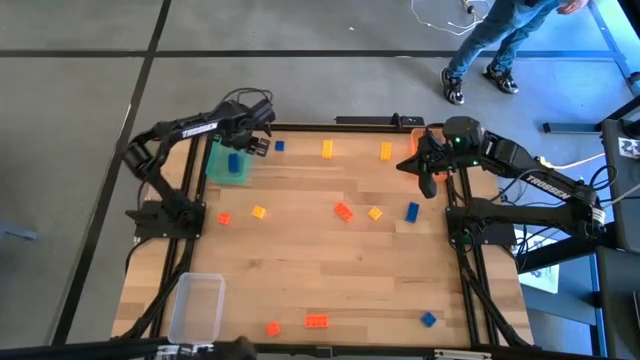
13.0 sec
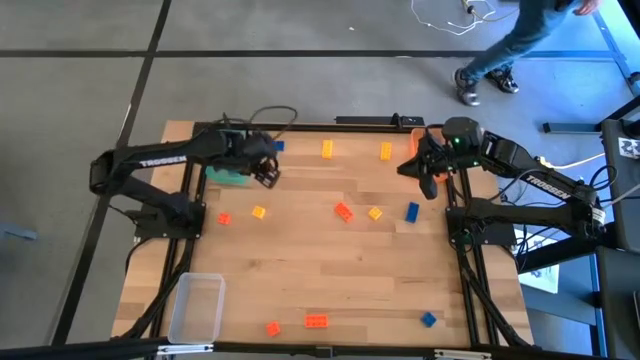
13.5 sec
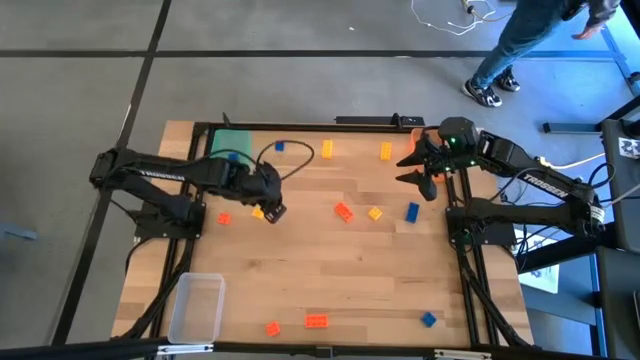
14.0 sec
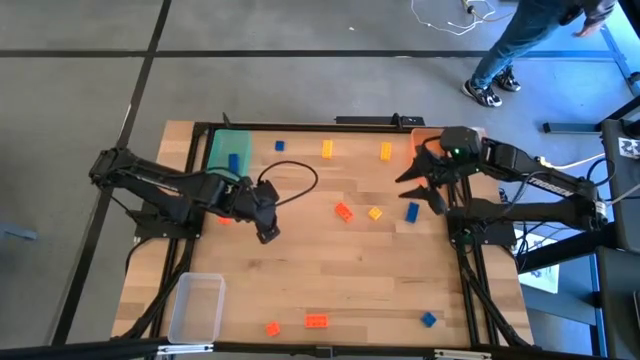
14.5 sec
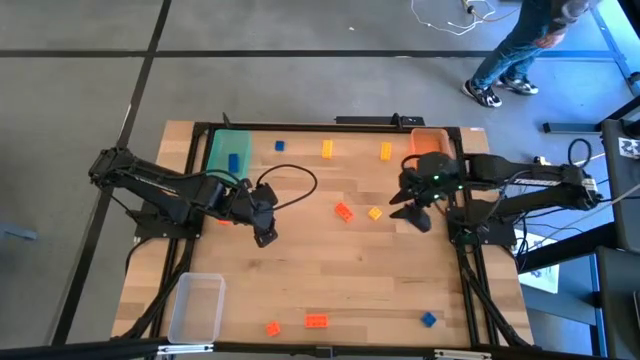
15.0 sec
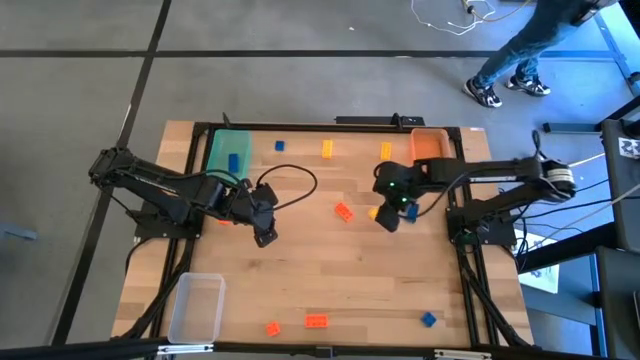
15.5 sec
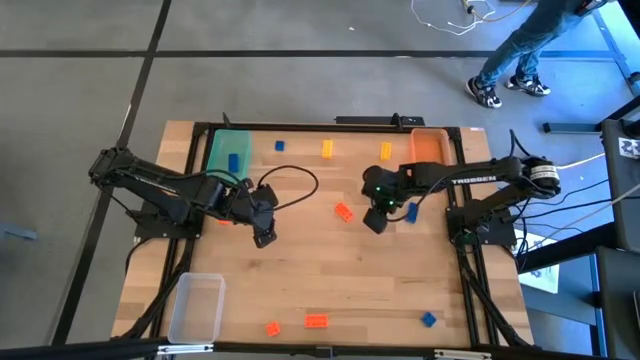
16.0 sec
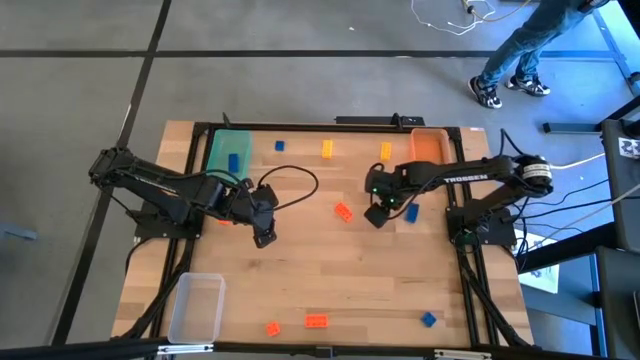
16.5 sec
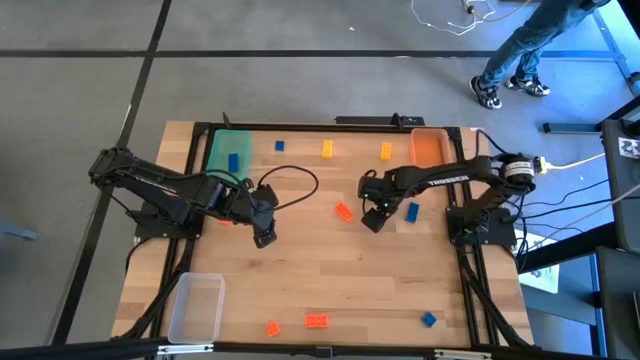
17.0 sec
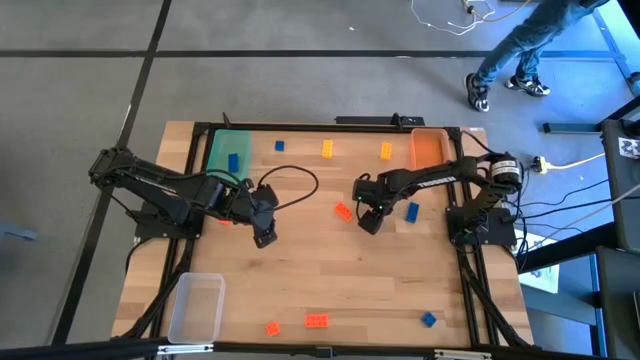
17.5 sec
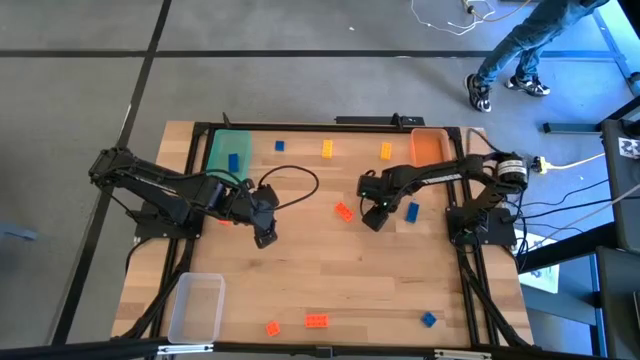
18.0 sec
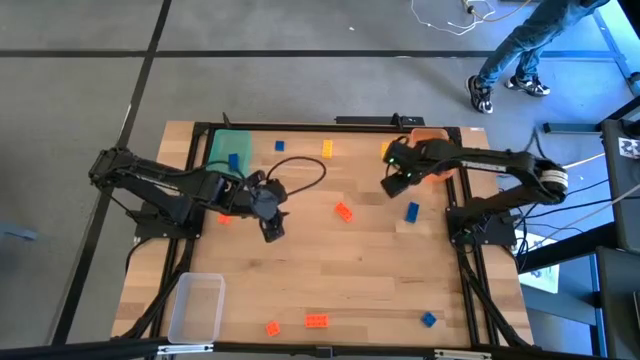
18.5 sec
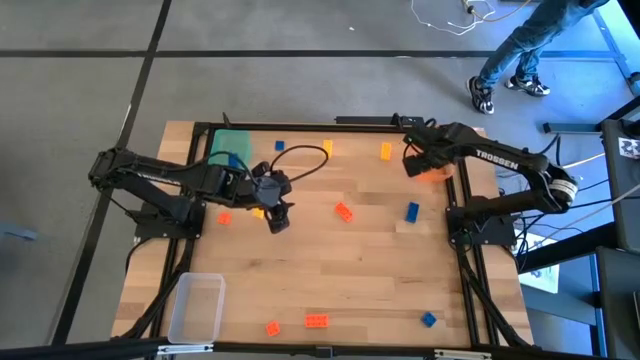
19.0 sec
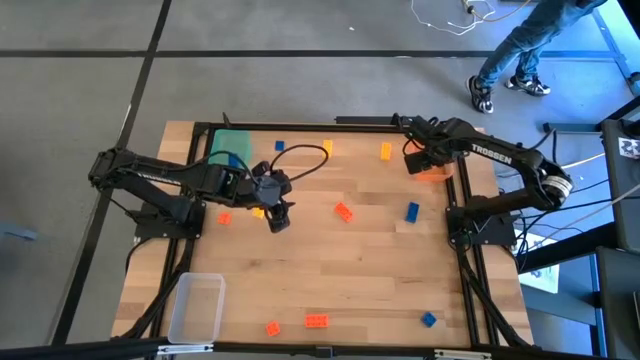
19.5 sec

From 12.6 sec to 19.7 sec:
Task: Sort & place blocks by color
Put the yellow game piece into the orange bin

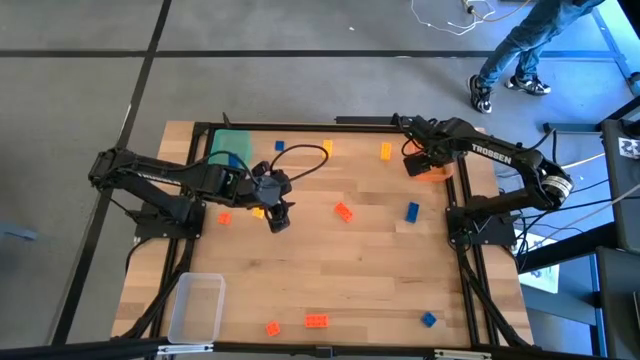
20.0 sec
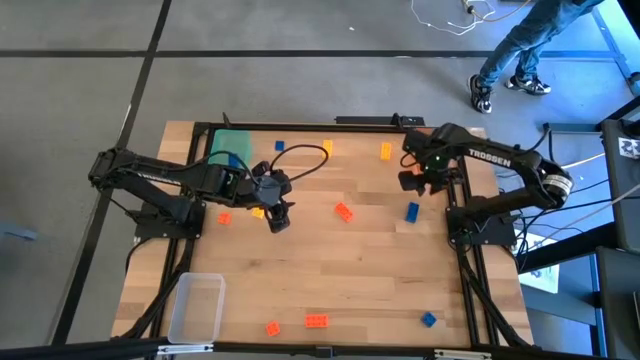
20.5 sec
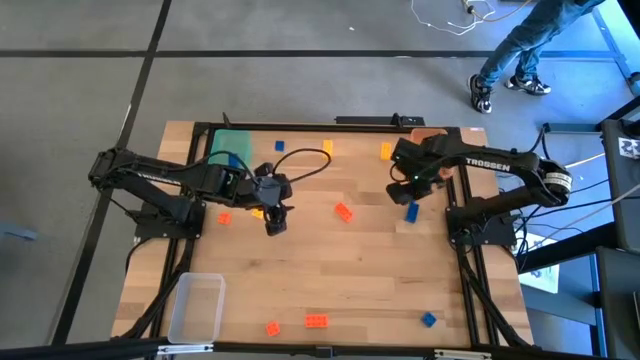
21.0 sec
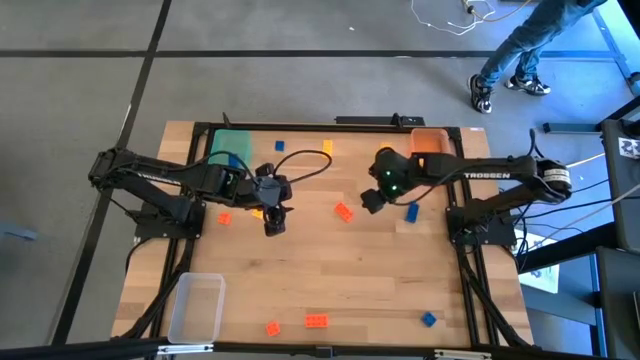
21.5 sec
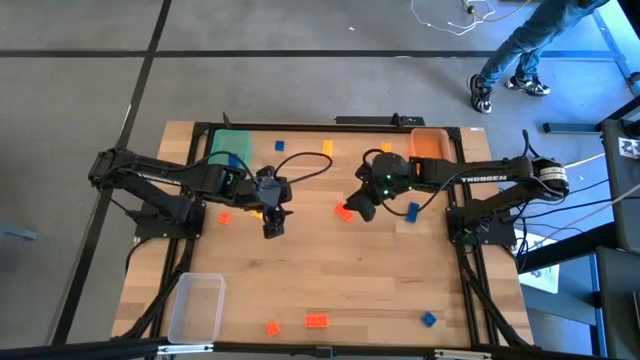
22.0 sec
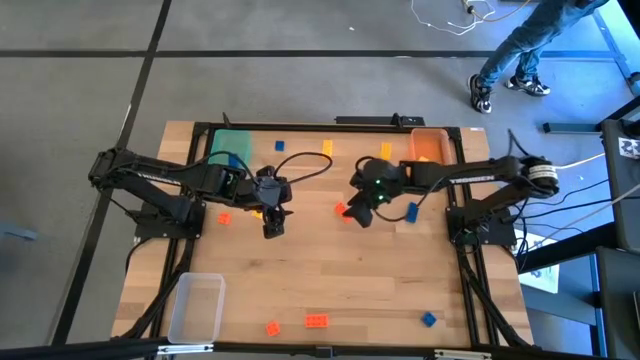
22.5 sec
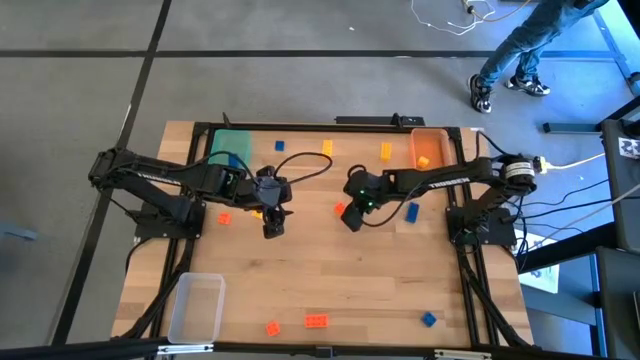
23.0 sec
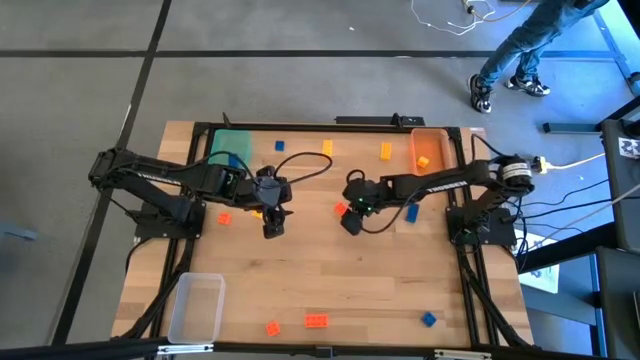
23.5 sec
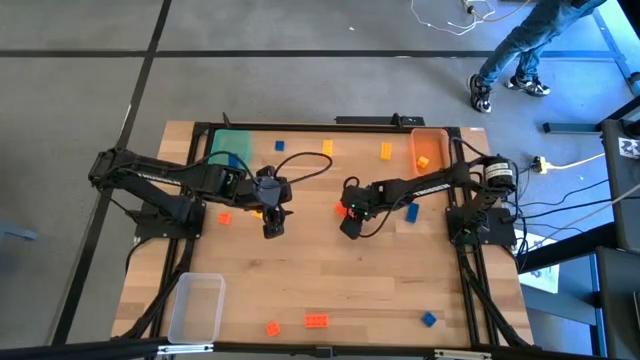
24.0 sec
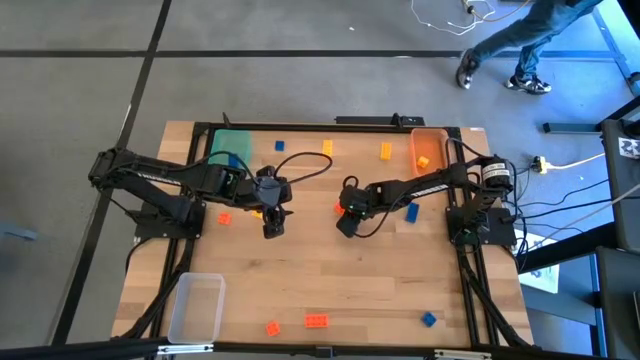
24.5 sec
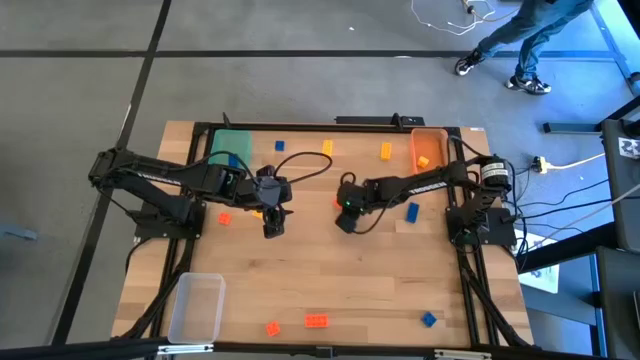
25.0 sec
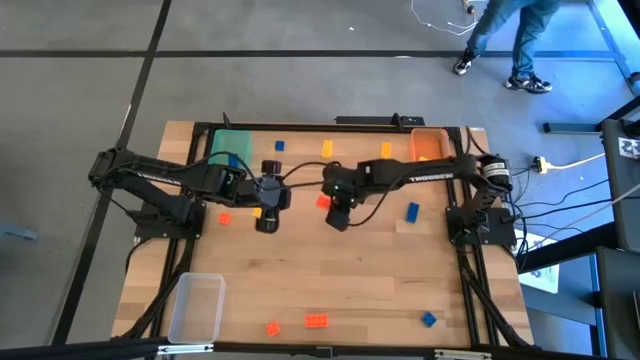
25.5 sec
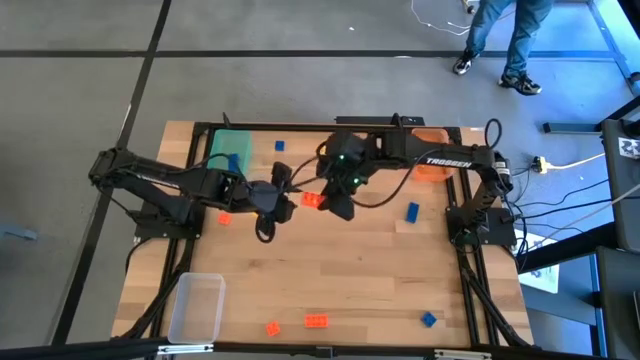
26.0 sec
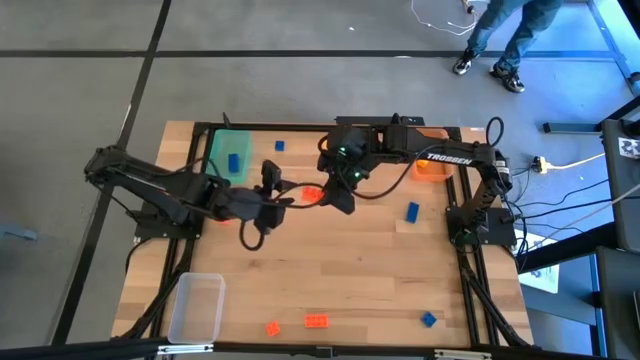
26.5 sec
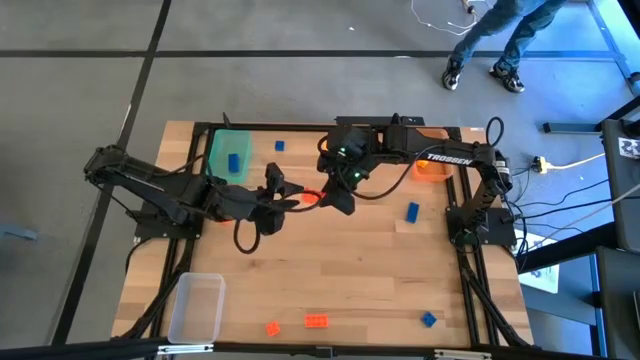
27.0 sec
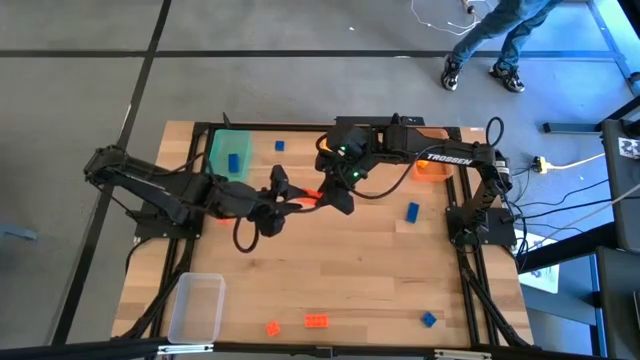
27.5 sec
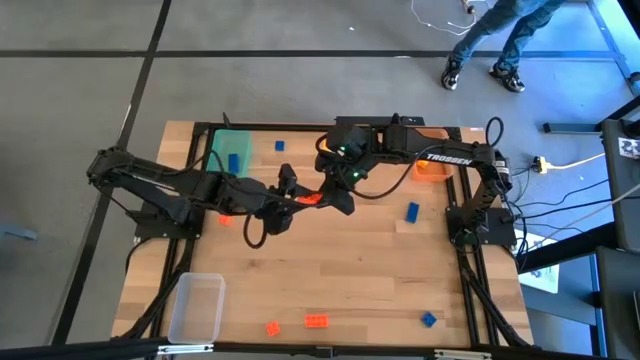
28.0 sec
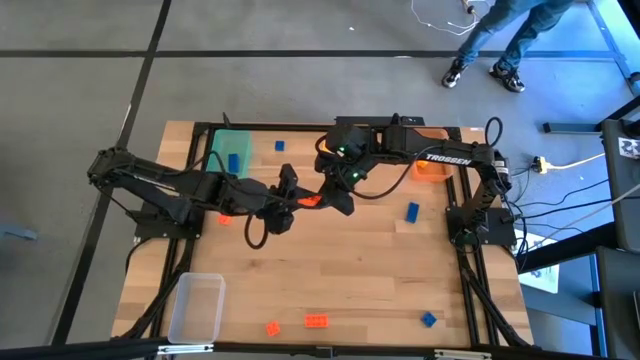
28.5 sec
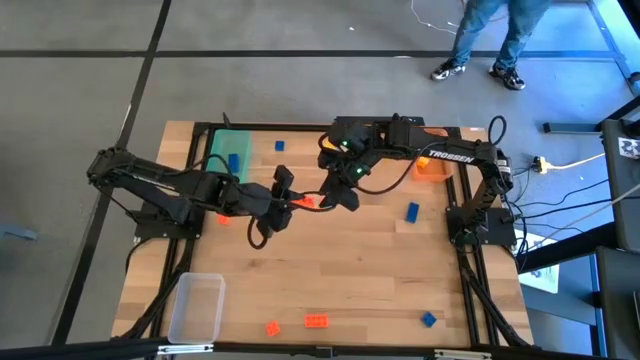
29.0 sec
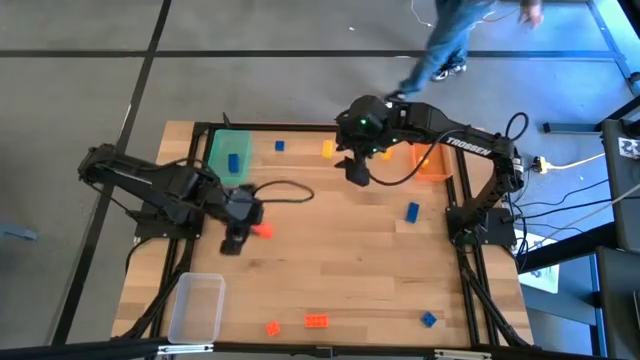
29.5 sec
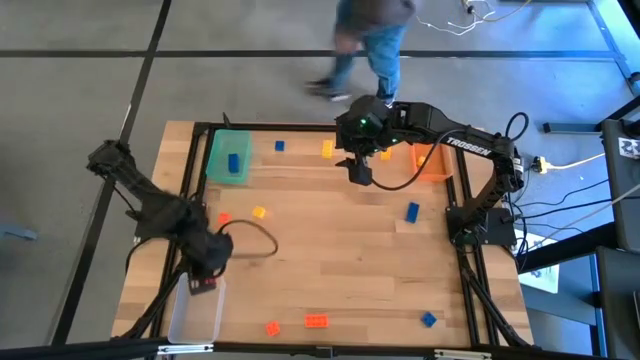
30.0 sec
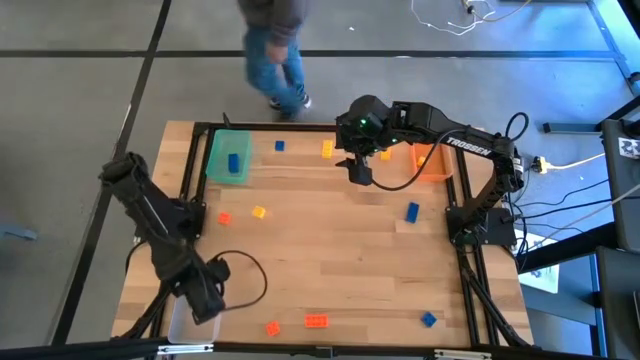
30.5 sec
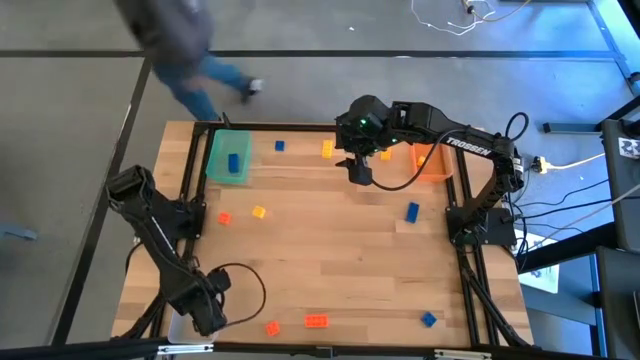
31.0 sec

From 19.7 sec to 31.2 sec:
Put the orange game piece into the transparent bin

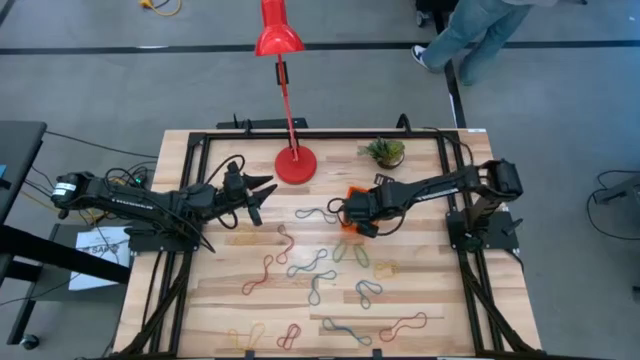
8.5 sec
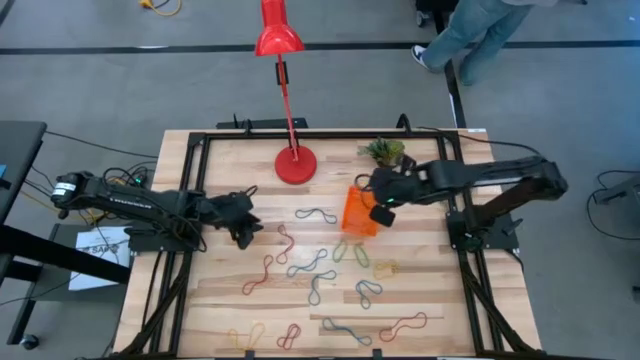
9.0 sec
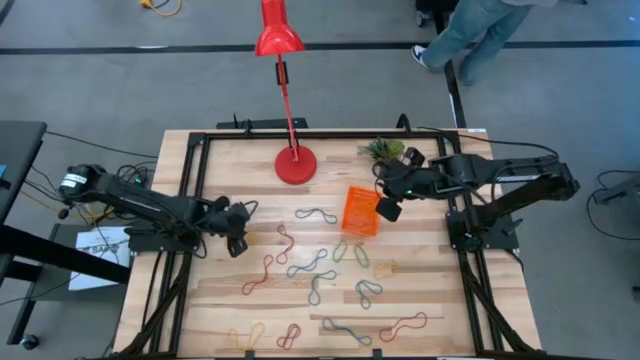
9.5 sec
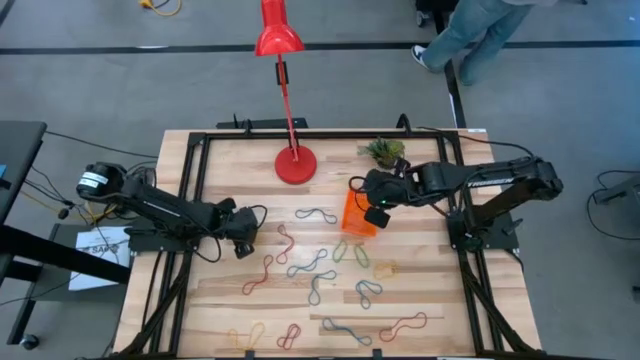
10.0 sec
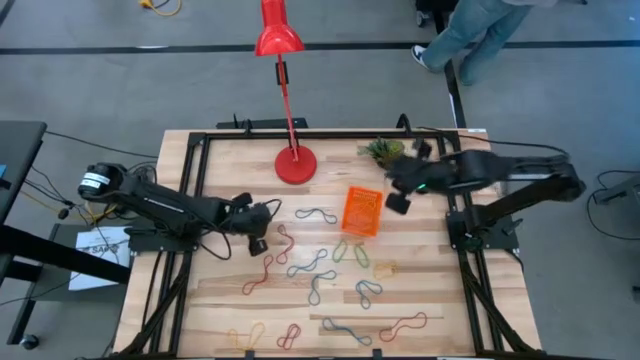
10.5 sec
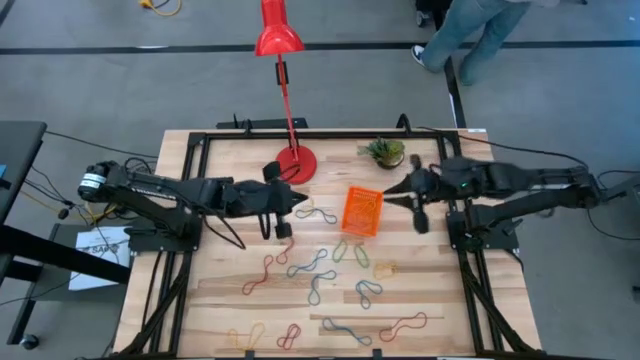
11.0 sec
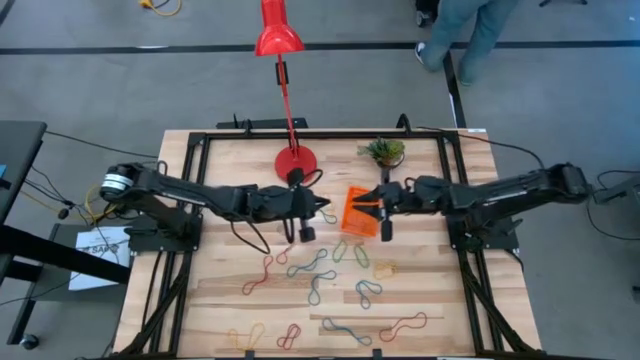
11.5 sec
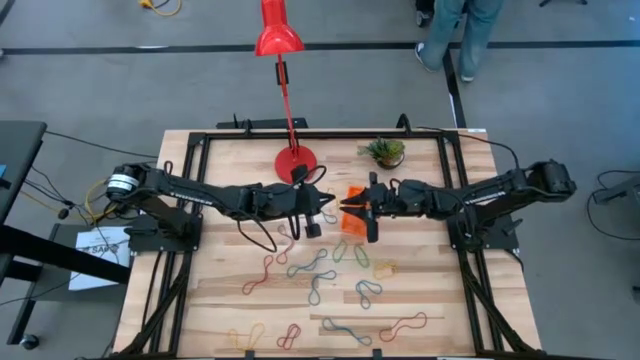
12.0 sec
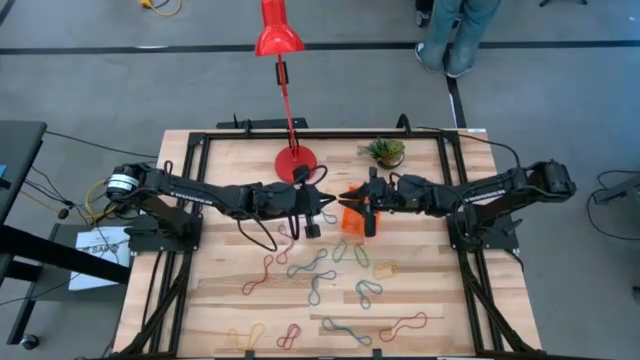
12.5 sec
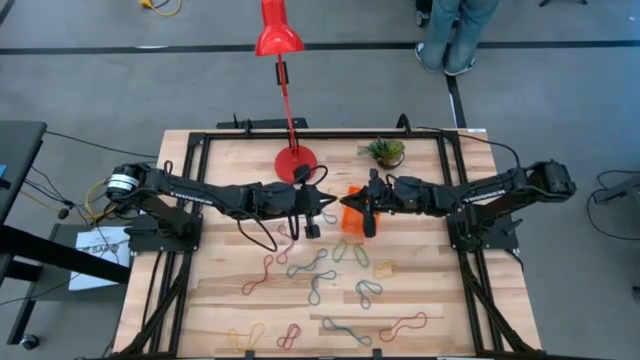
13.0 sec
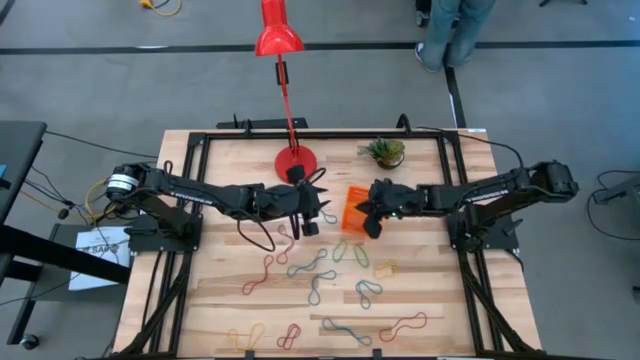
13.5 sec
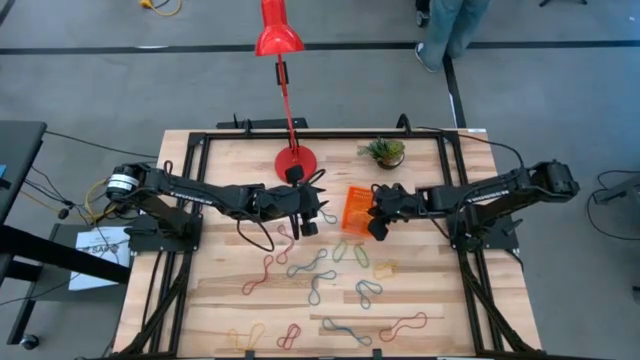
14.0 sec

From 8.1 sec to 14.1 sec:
Task: Pick and place items into bin
Put the left yellow rubberband into the orange basket
